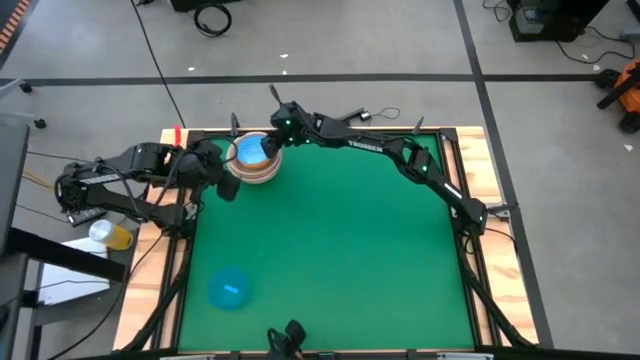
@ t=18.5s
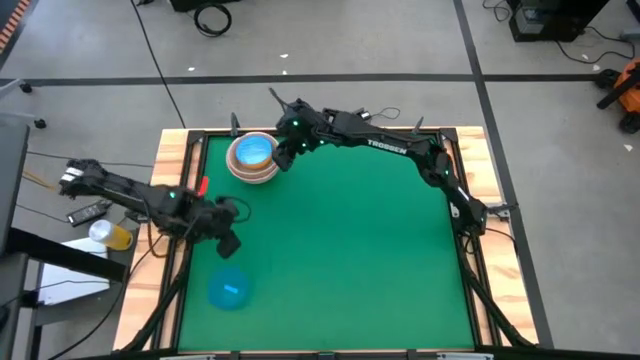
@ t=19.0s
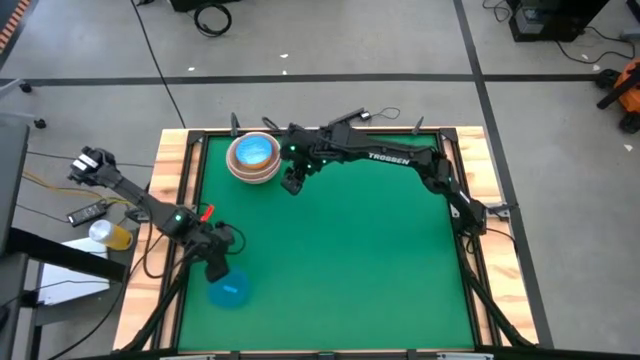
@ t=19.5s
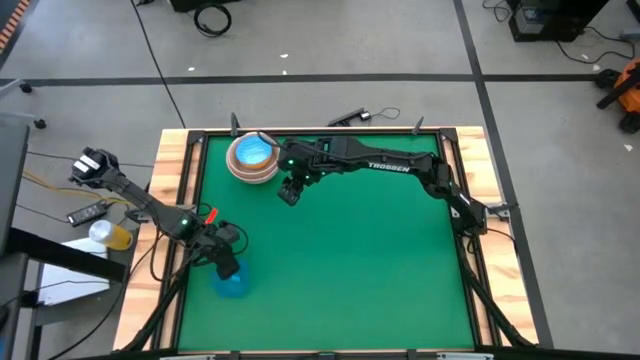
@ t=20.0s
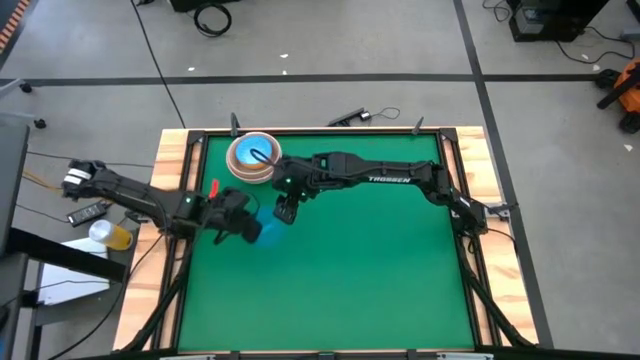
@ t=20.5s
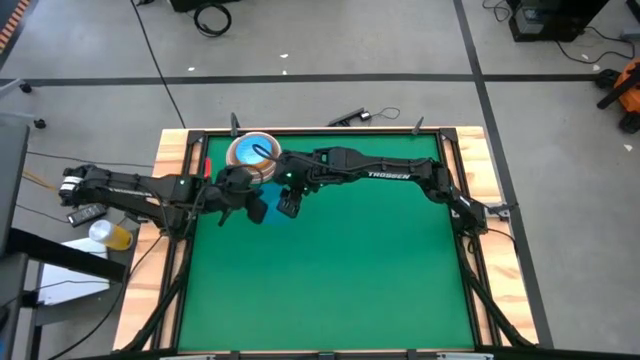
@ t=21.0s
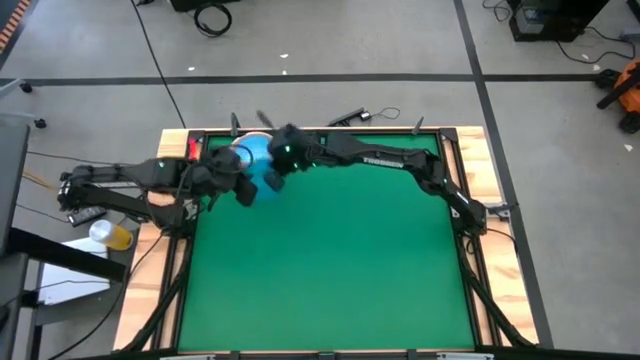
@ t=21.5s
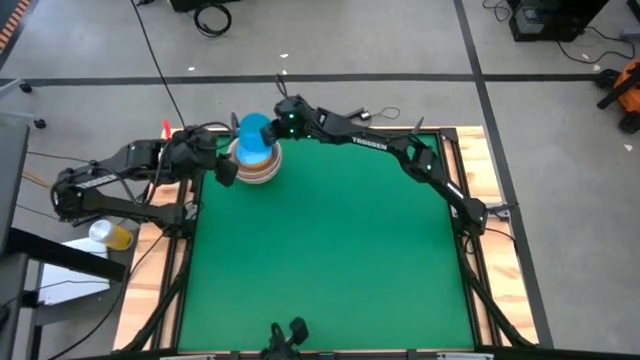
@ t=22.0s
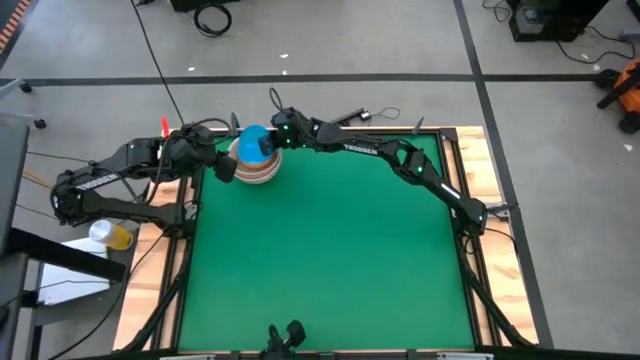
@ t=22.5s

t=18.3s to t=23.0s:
Stack the transparent blue bowl on top of the blue bowl

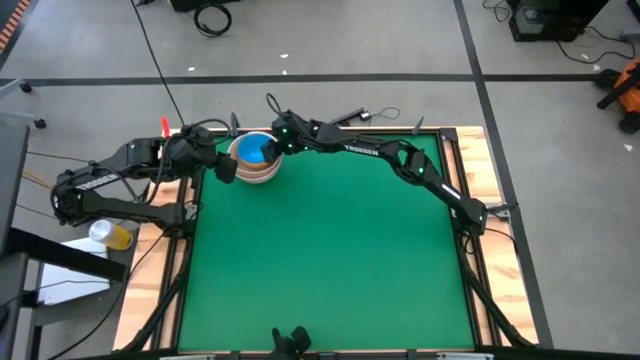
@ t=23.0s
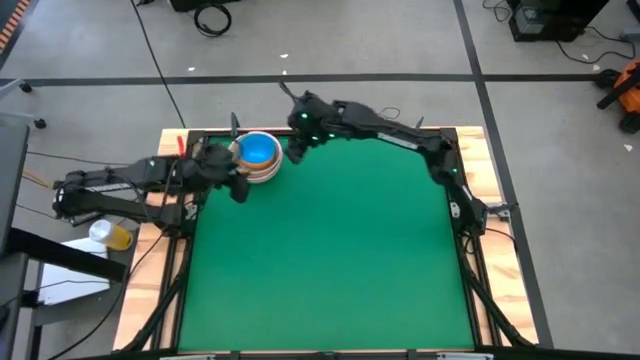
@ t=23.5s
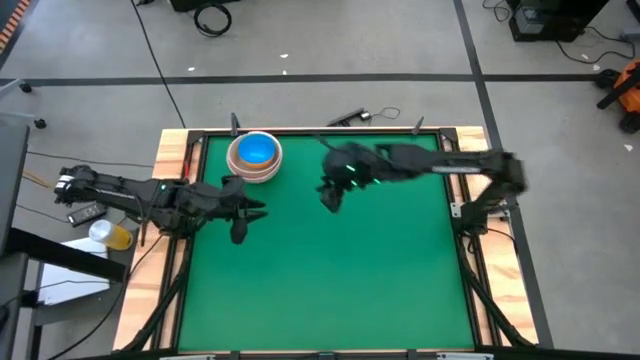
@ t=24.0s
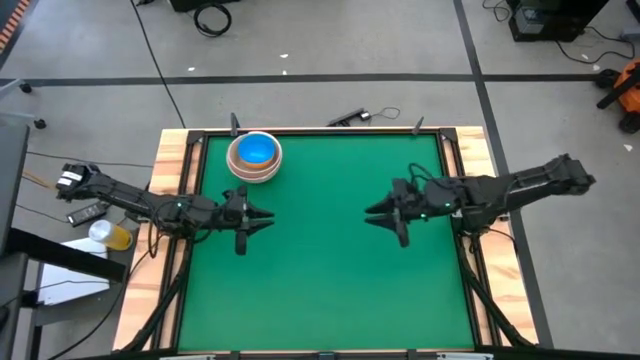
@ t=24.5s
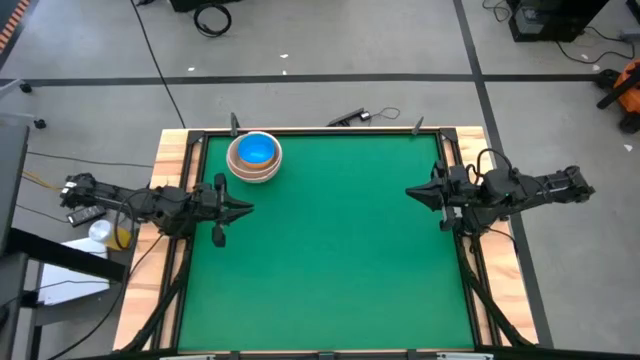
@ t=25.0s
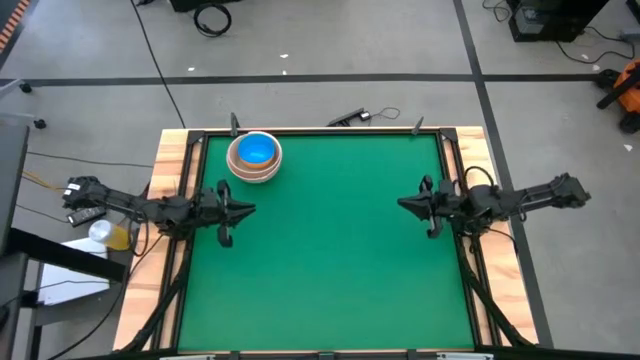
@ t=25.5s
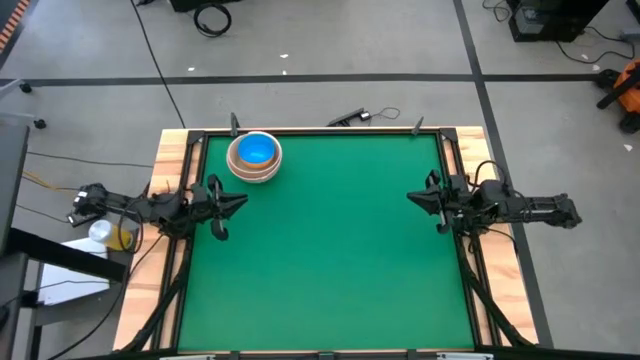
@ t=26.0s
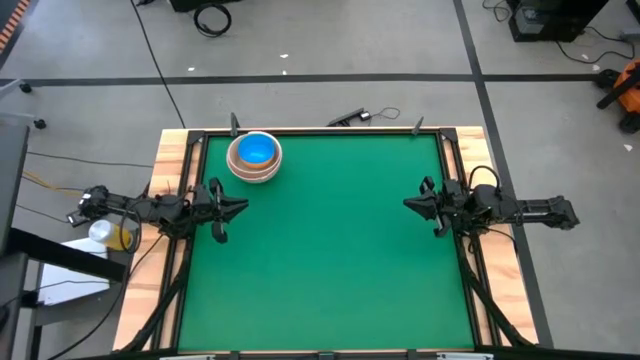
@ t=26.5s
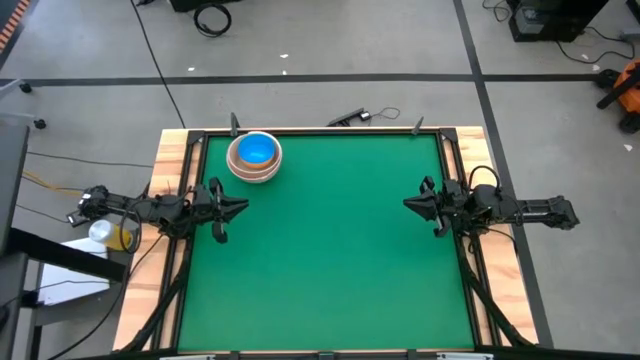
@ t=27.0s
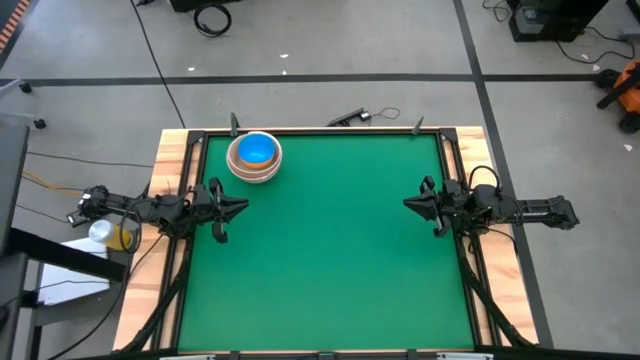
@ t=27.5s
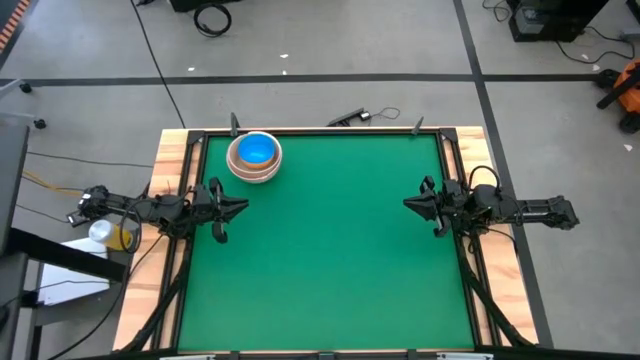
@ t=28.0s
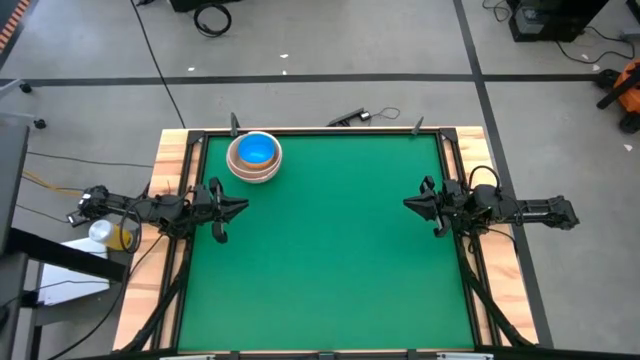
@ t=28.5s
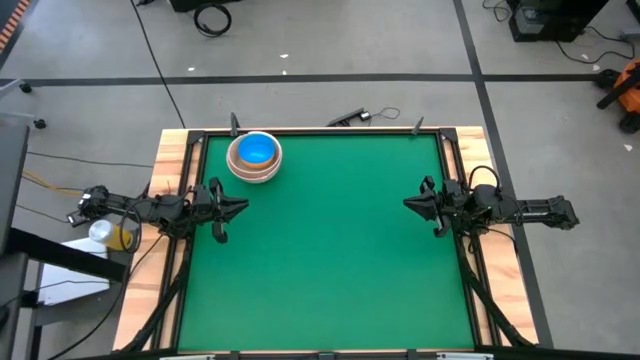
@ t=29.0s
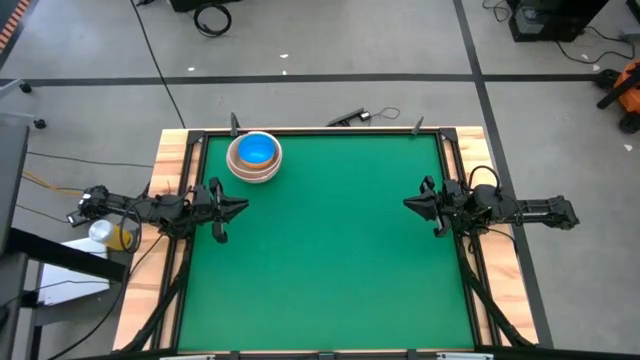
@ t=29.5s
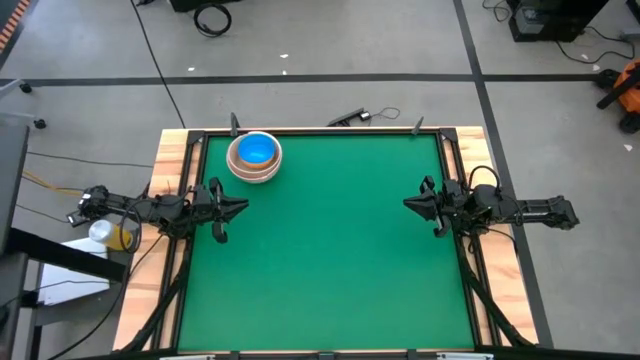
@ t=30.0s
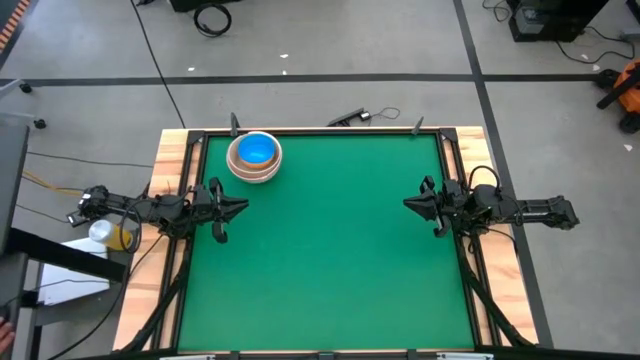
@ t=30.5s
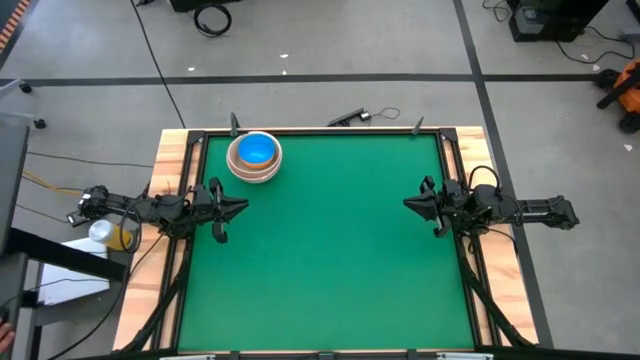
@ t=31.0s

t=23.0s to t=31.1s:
Return to Home Position
